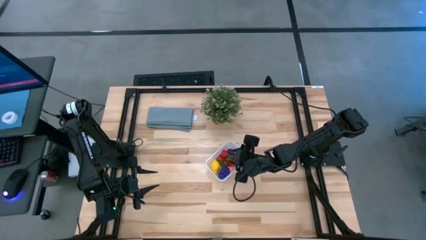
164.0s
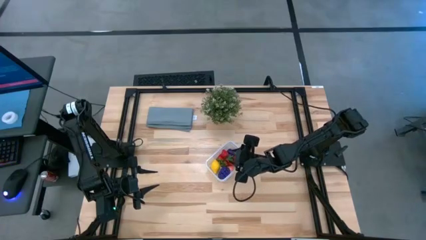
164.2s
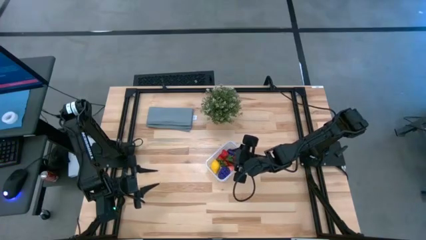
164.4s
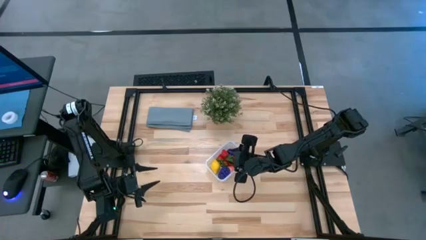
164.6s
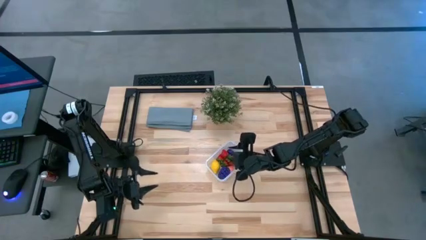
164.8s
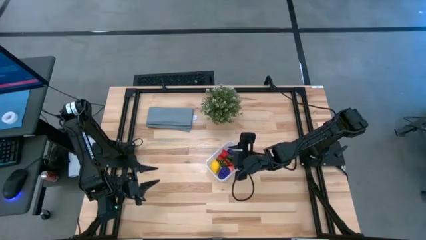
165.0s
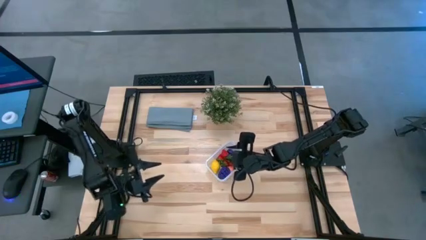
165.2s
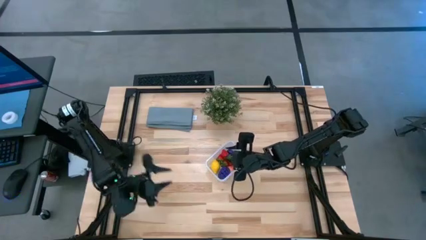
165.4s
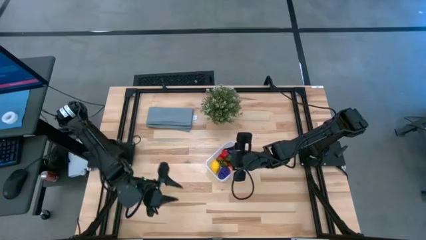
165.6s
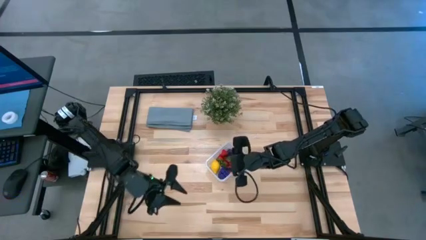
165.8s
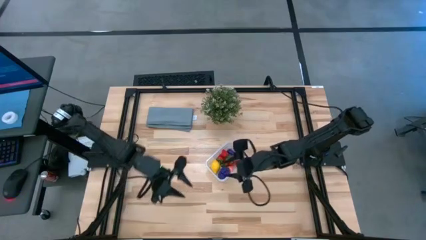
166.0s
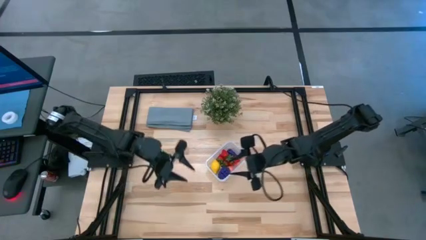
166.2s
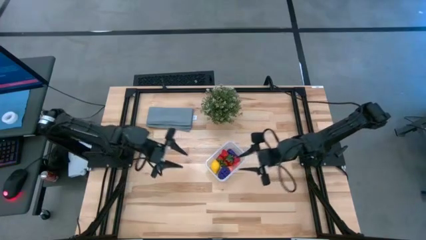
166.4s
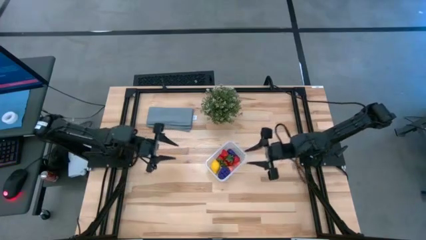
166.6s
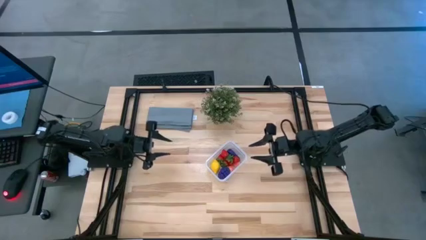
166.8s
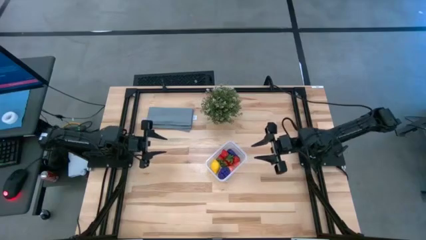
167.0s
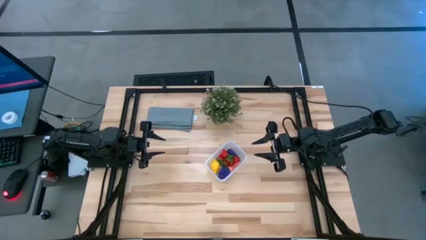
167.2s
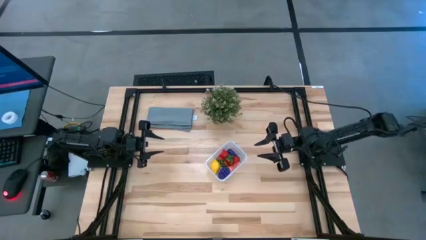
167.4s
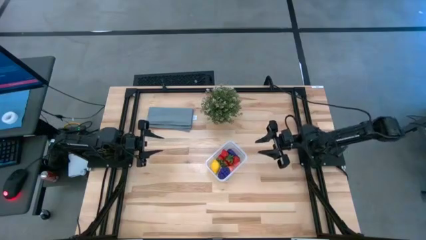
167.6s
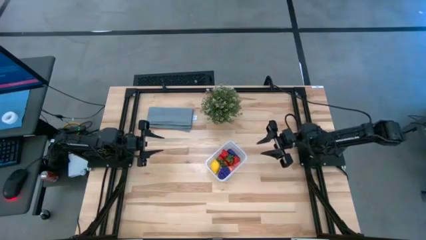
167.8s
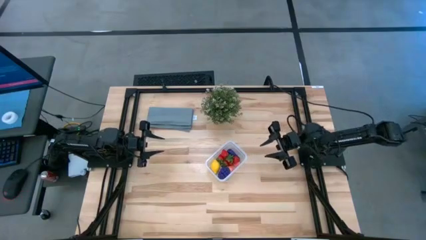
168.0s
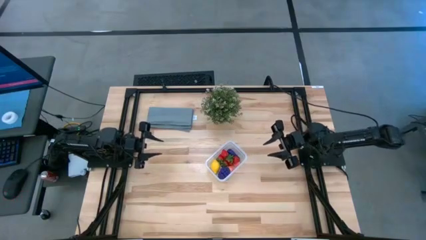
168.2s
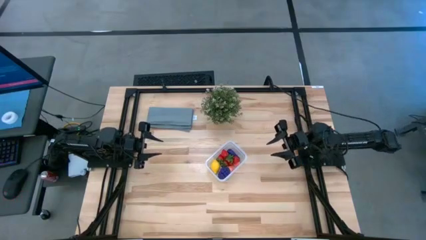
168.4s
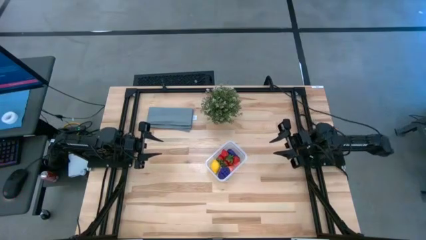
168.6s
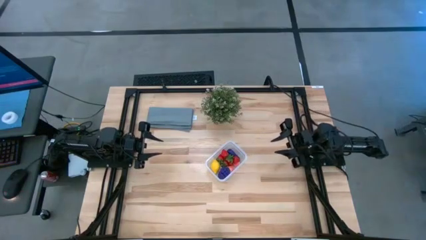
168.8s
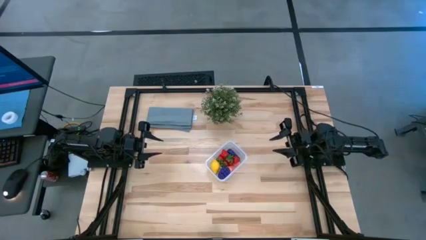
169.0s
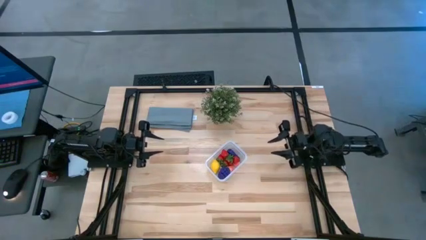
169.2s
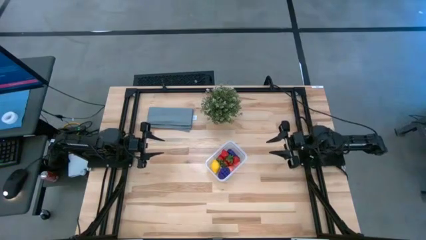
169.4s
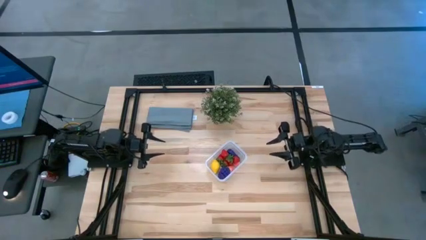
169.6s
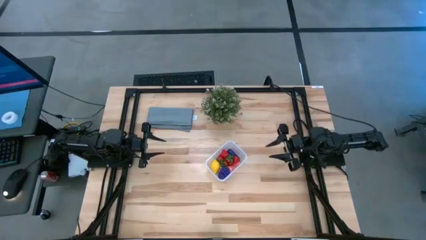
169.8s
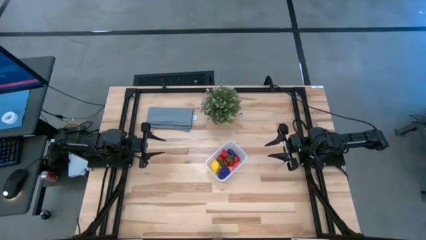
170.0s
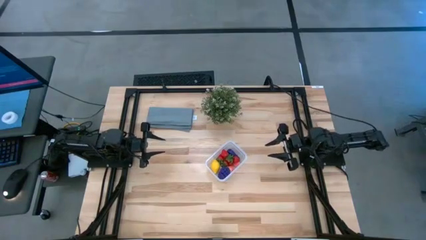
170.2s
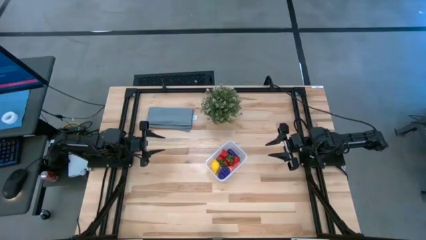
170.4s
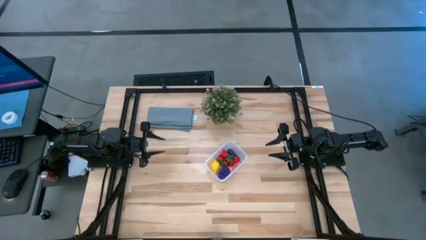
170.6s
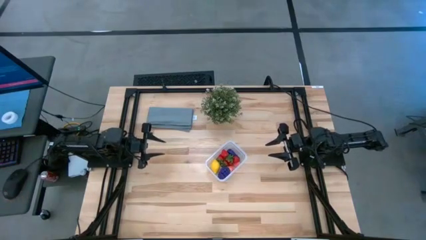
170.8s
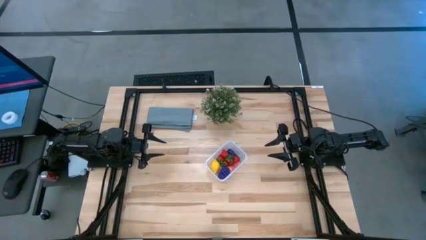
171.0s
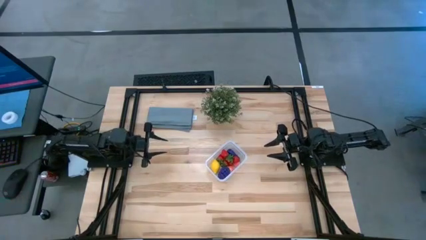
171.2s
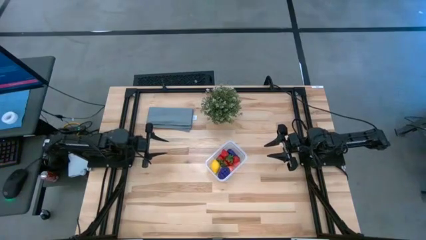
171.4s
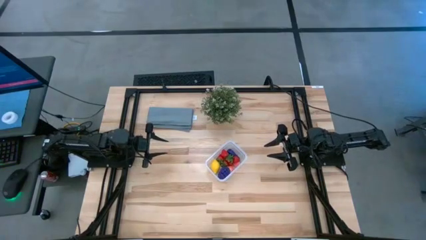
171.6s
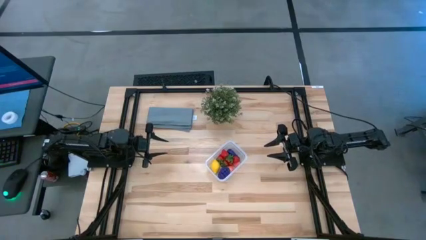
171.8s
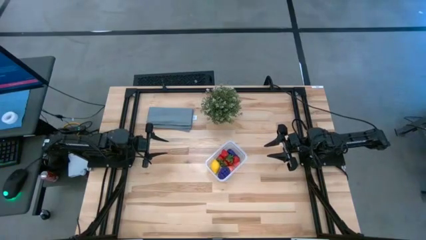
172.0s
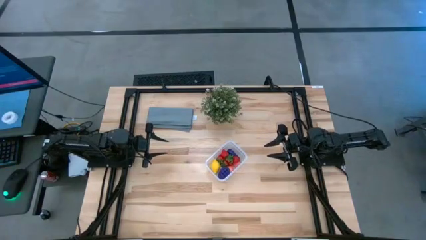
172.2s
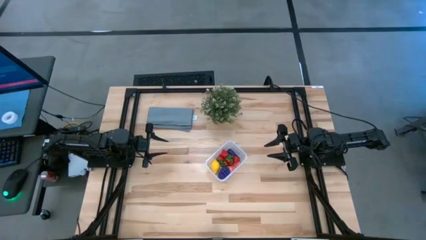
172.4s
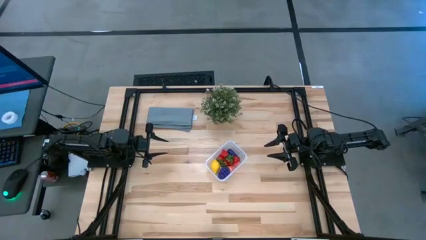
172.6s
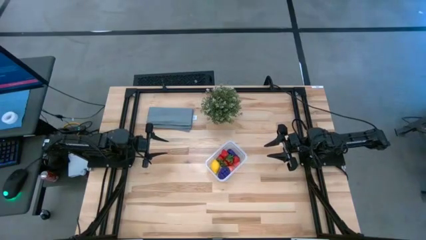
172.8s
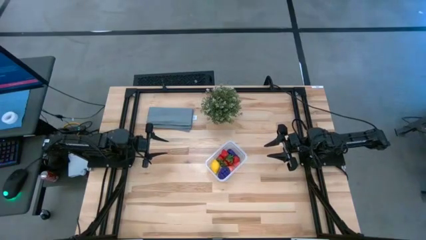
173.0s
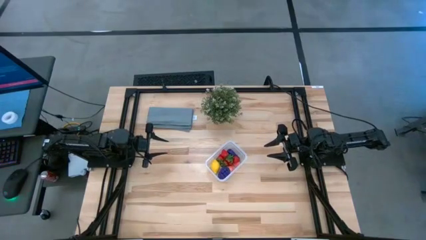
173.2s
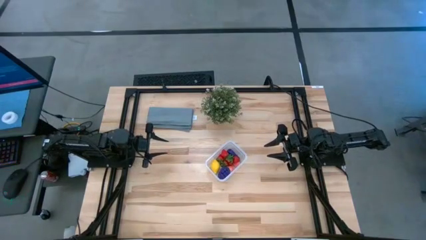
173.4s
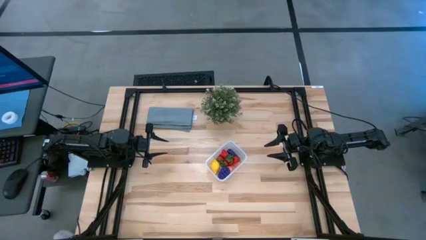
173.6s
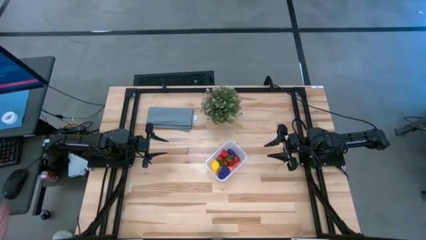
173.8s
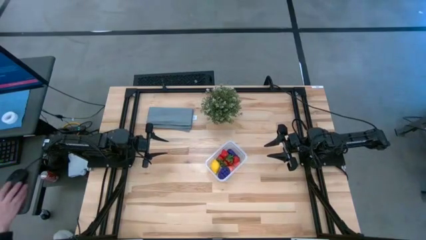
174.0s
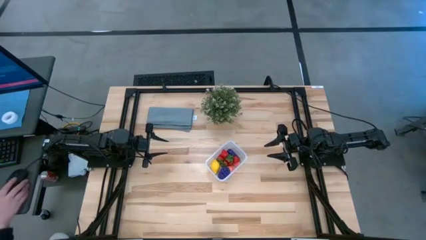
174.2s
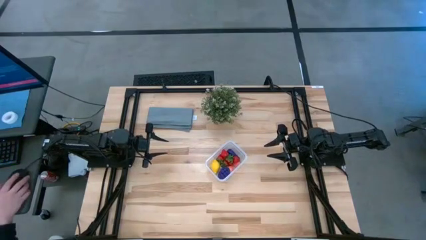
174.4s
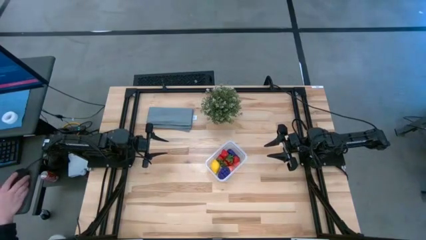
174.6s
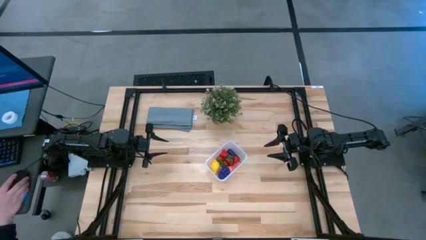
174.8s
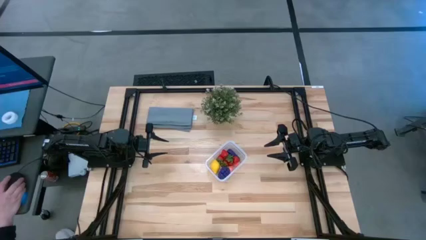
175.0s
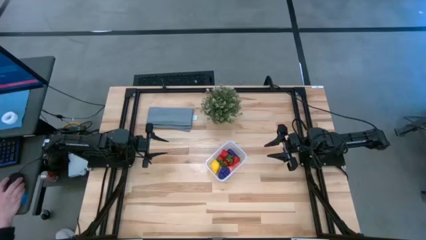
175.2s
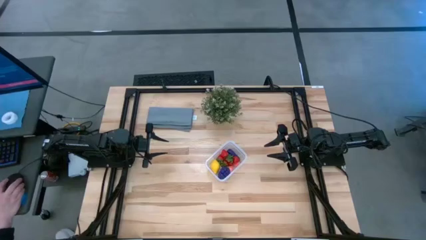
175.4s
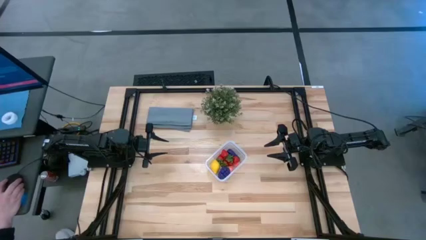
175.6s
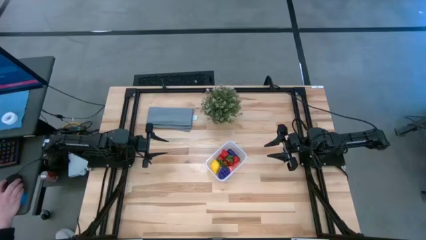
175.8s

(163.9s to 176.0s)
Task: Pick and placing Produce into tupperware
Return to Home Position
